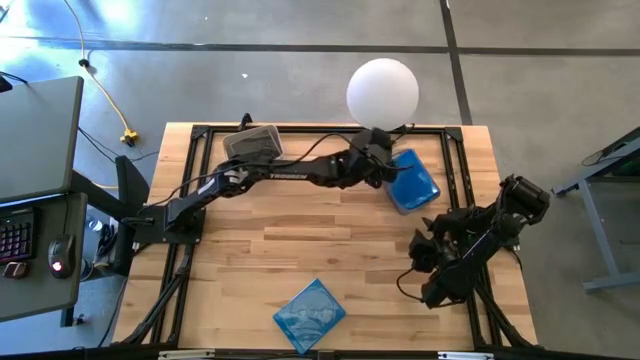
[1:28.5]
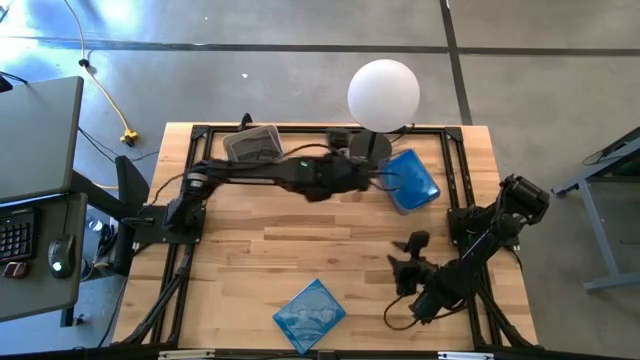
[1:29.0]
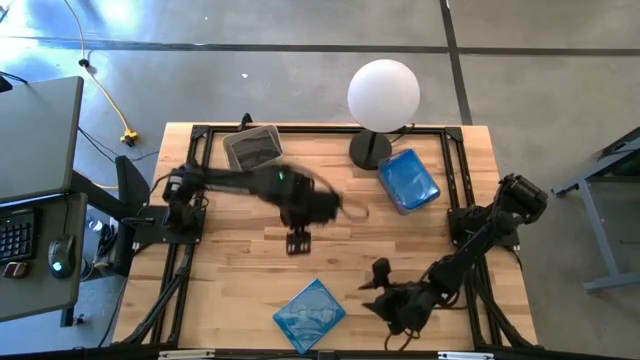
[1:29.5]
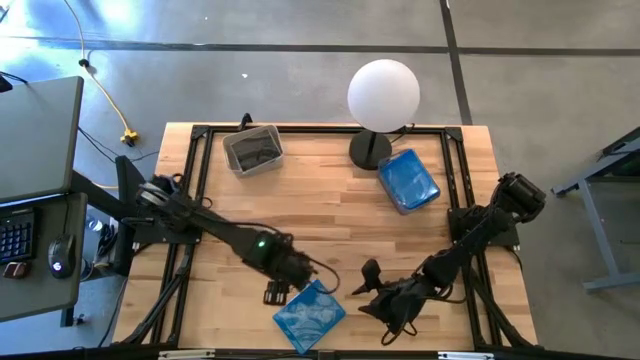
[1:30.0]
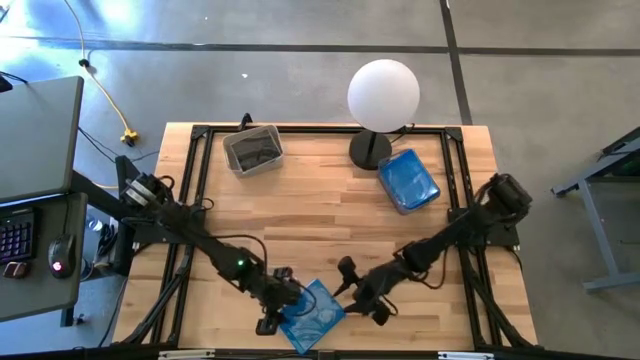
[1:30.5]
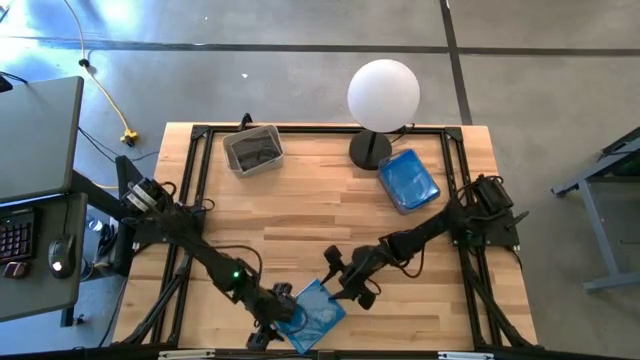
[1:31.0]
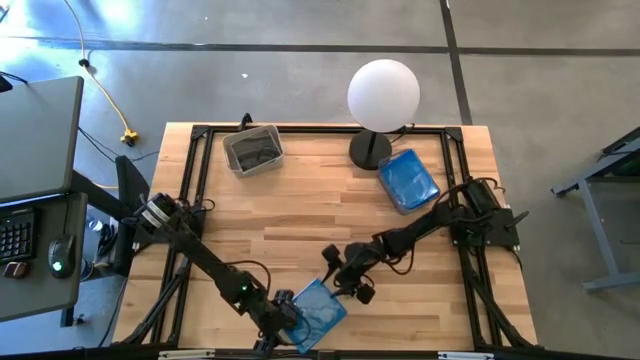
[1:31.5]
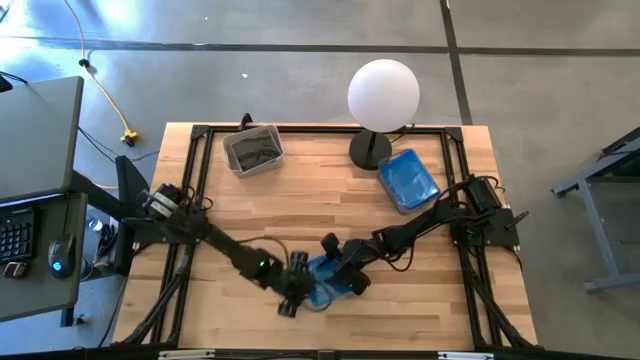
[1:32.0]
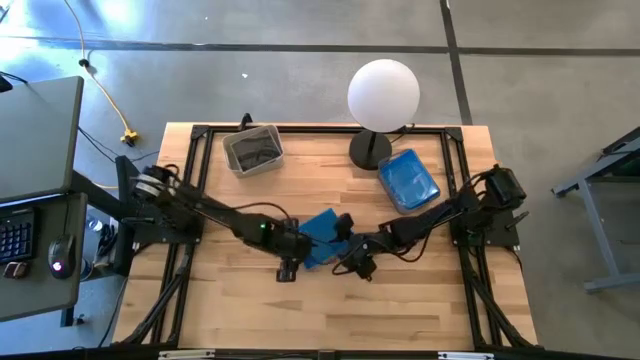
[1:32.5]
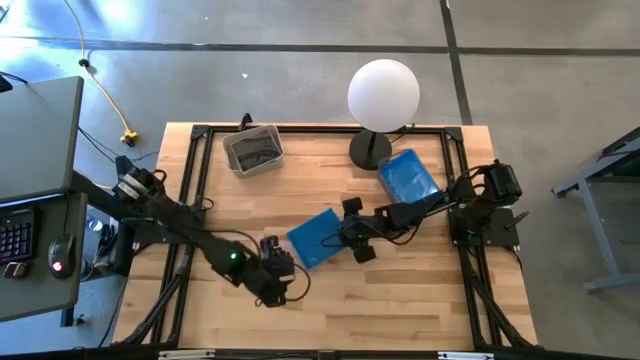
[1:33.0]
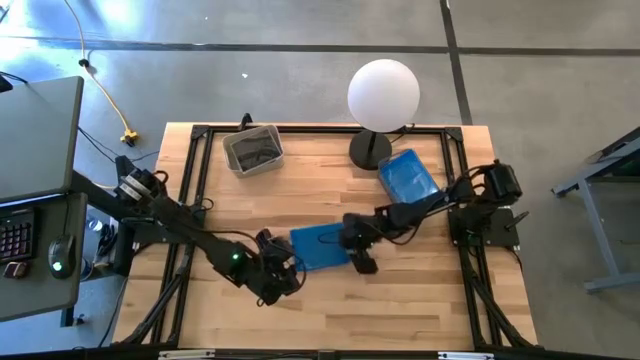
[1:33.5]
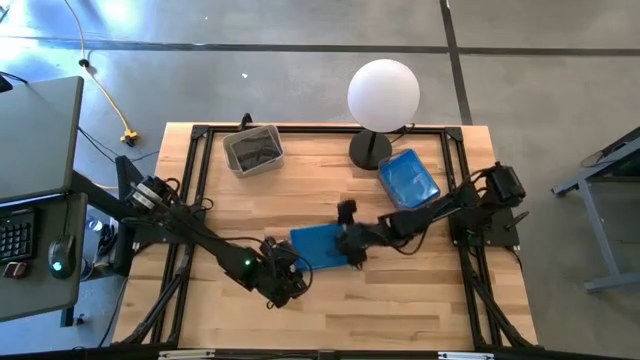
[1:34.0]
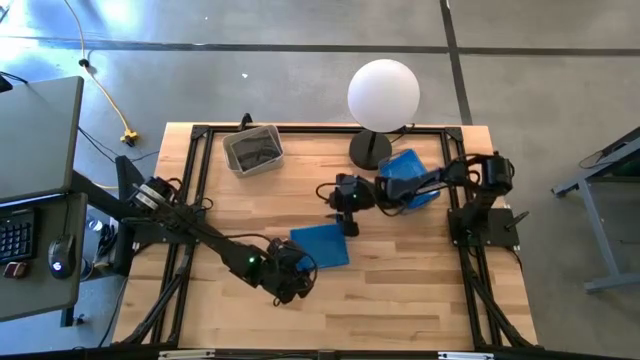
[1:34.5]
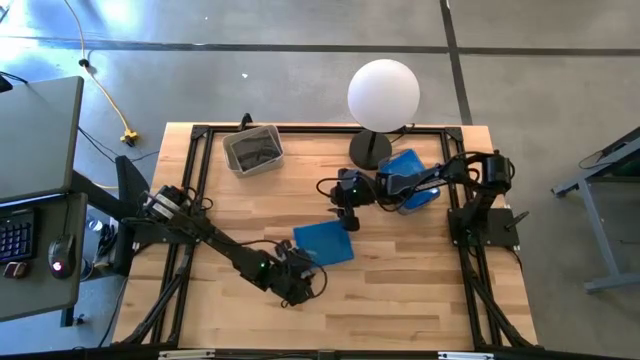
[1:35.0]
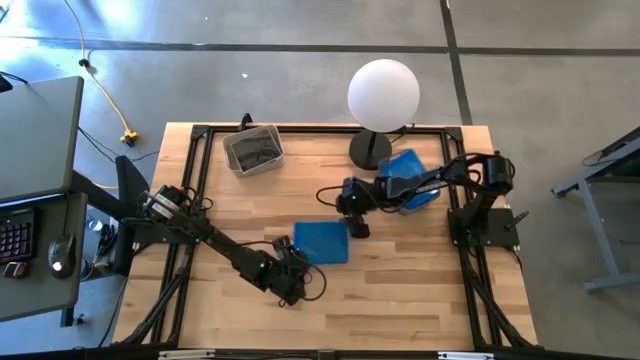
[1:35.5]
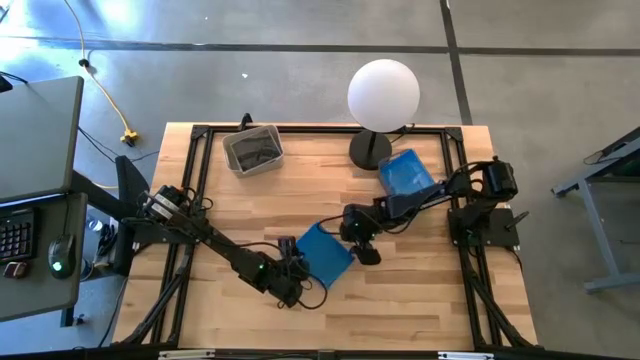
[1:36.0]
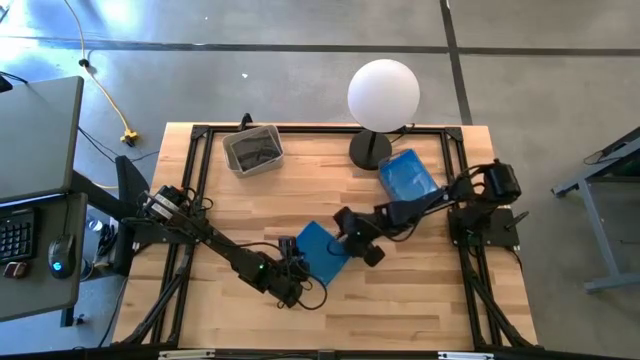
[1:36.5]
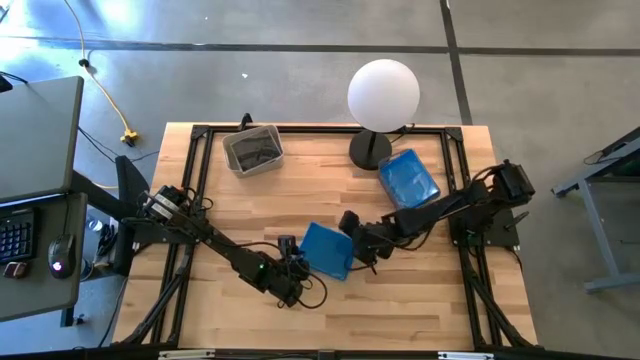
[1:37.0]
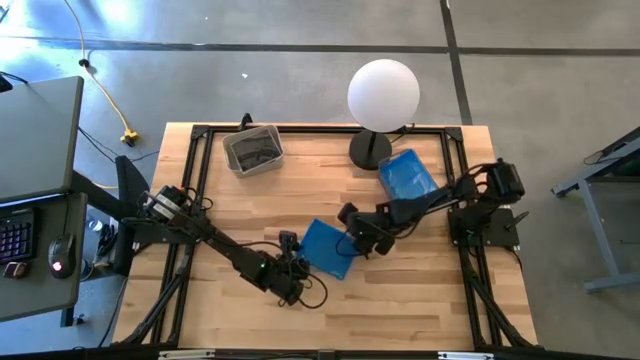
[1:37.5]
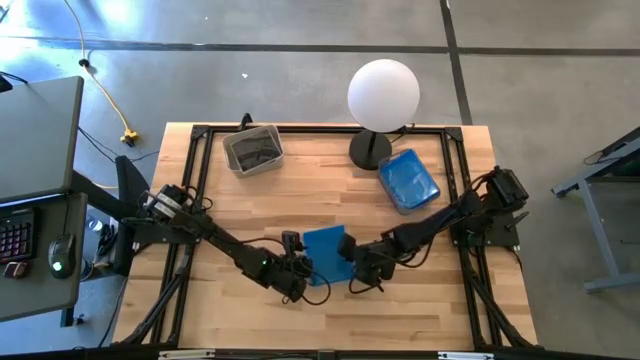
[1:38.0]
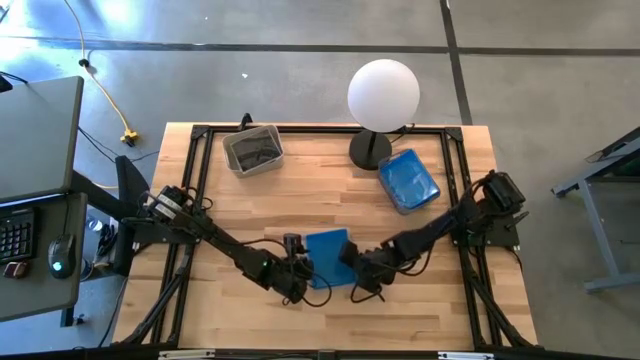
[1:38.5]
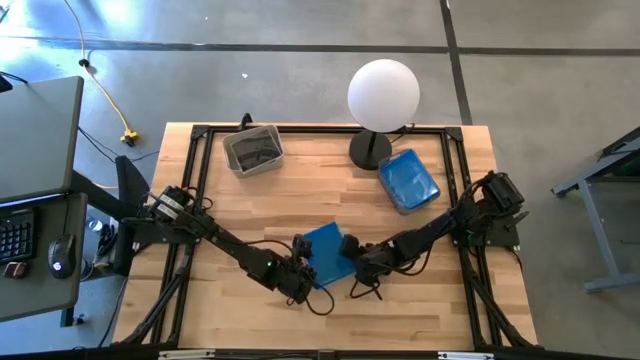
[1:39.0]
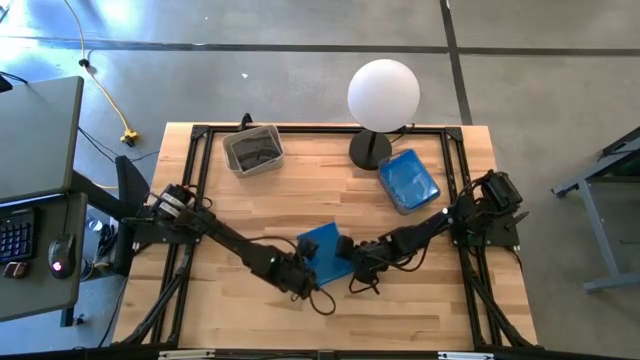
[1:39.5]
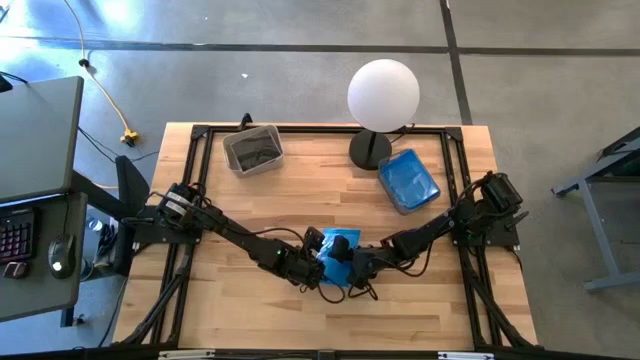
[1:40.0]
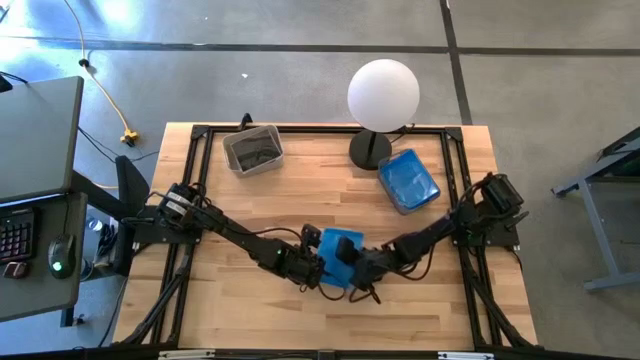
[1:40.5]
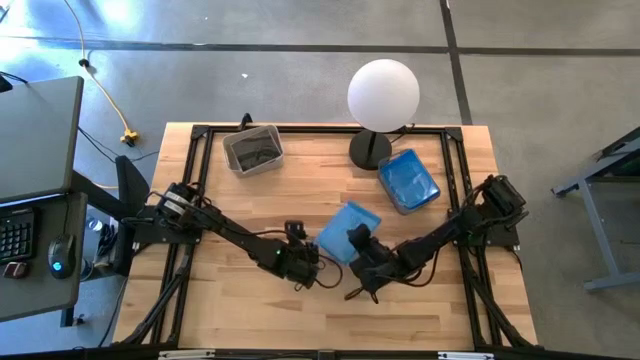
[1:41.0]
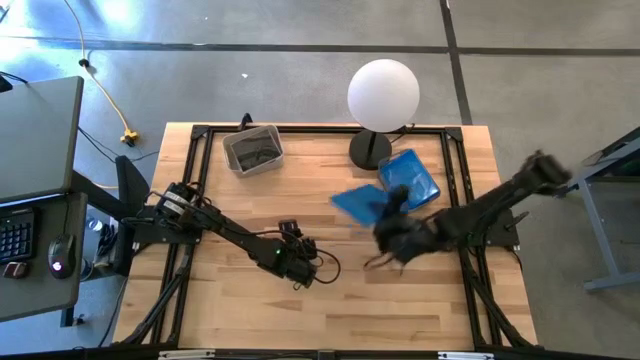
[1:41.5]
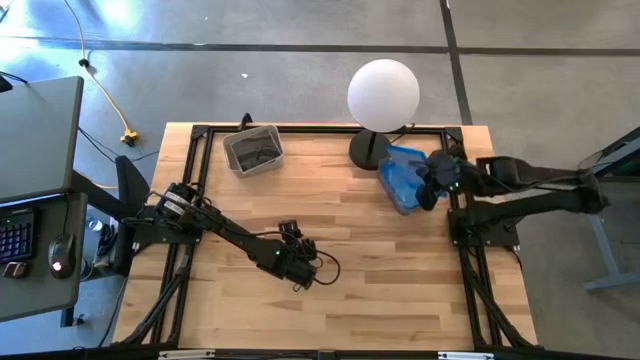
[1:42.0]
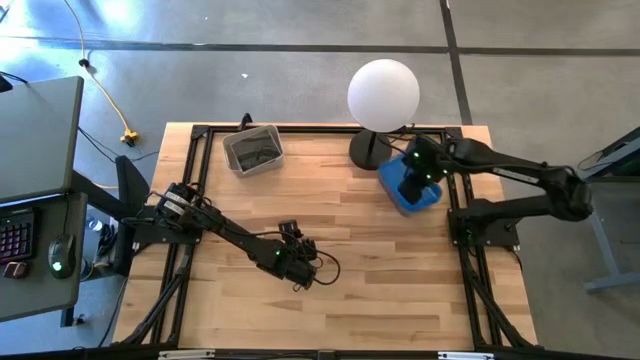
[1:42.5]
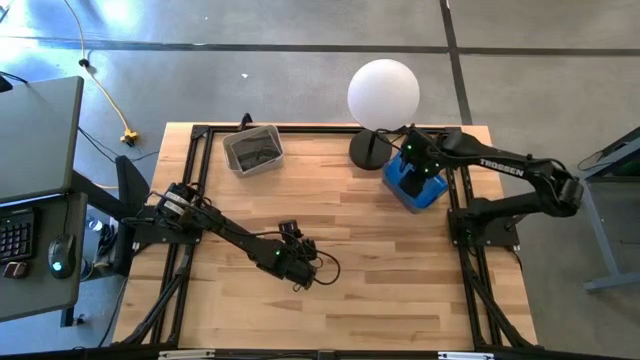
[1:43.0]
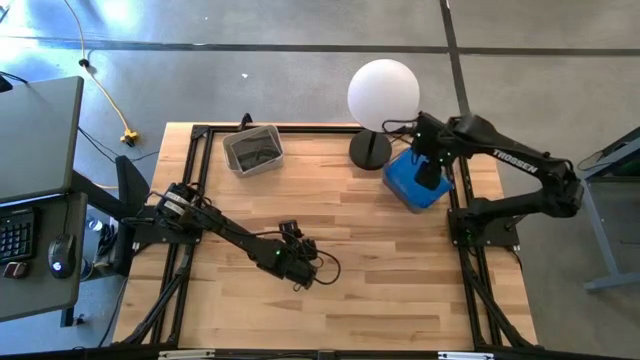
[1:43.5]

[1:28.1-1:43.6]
Task: Pick & place jewel cases by type
Put the blue CD case into the gray bin

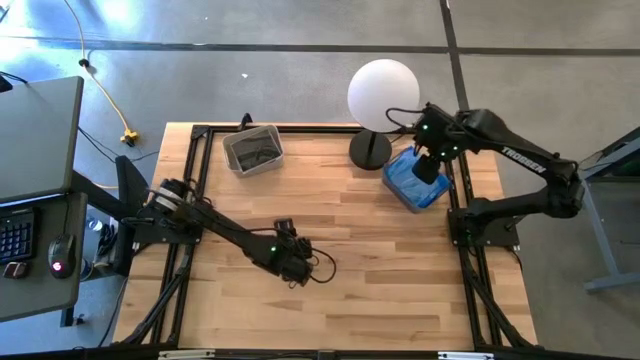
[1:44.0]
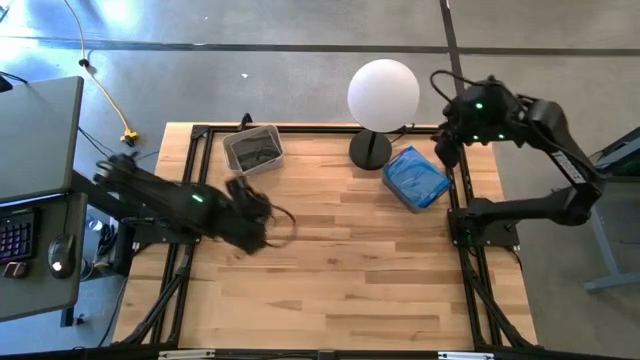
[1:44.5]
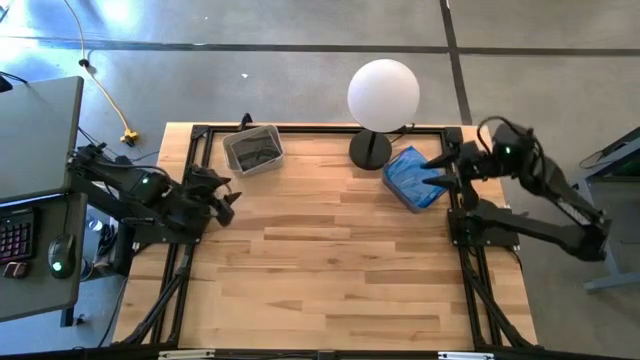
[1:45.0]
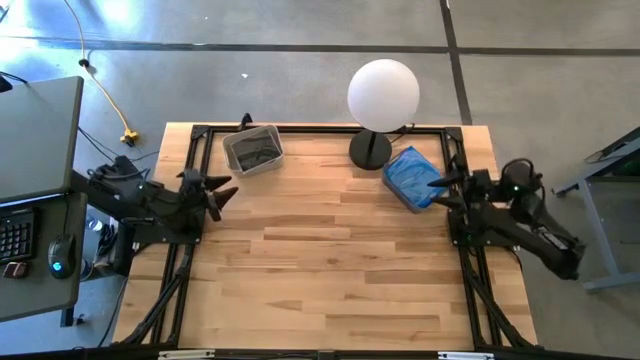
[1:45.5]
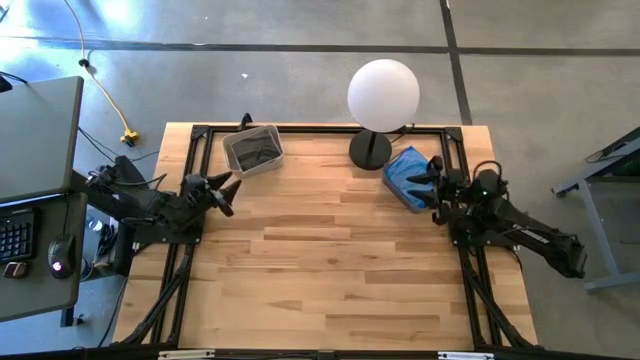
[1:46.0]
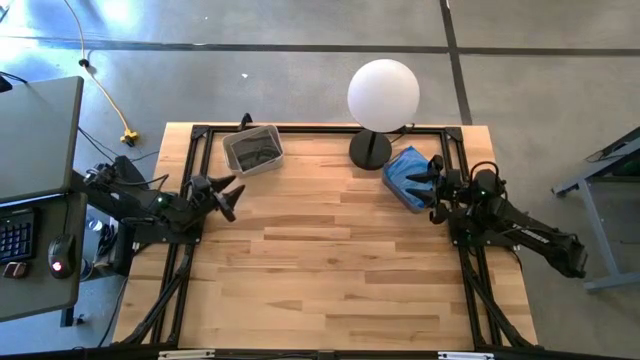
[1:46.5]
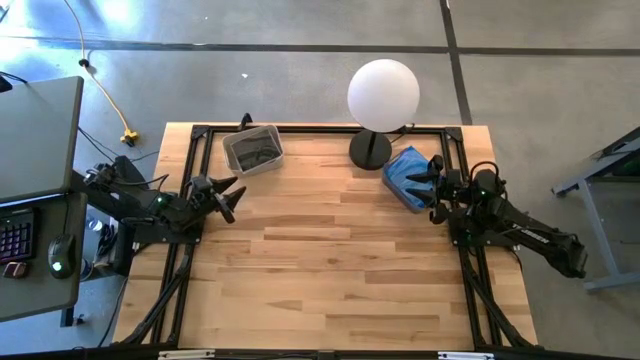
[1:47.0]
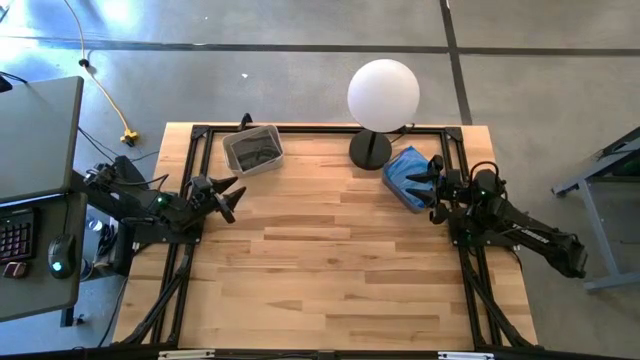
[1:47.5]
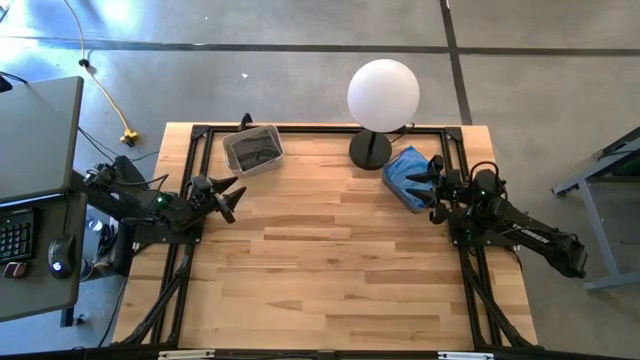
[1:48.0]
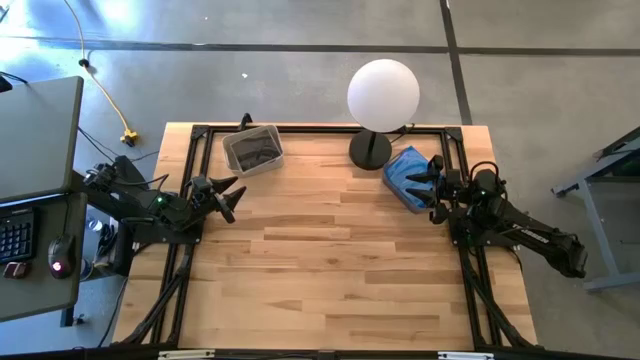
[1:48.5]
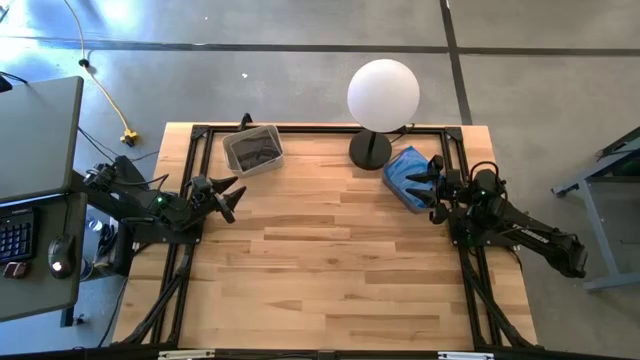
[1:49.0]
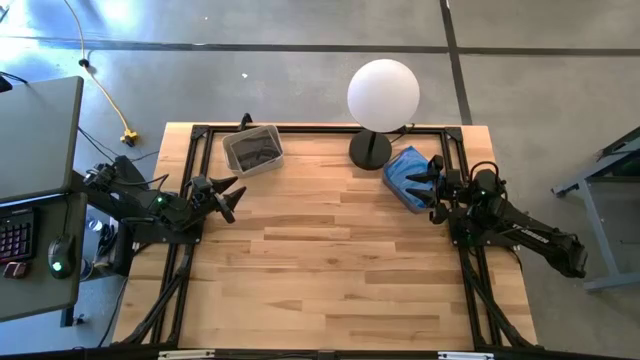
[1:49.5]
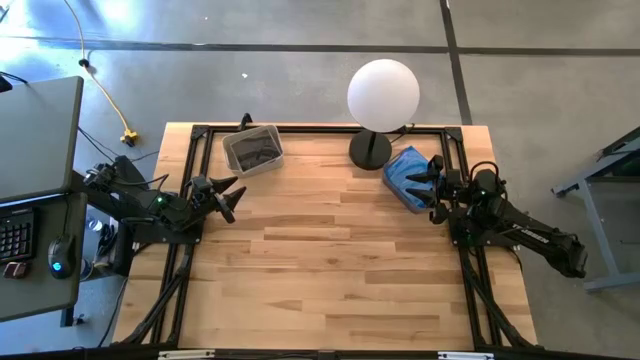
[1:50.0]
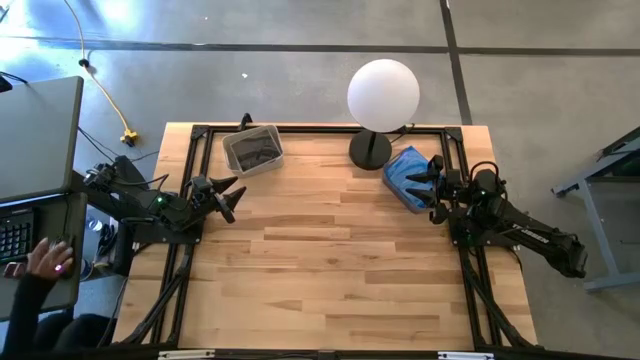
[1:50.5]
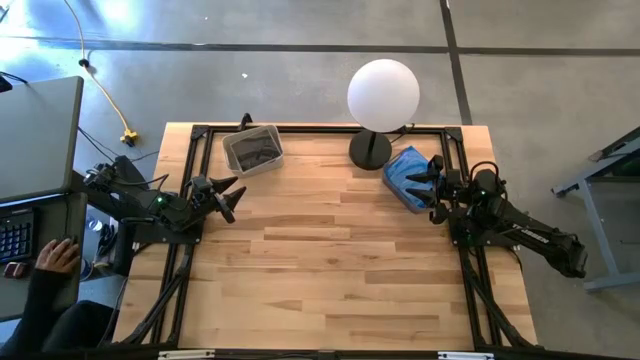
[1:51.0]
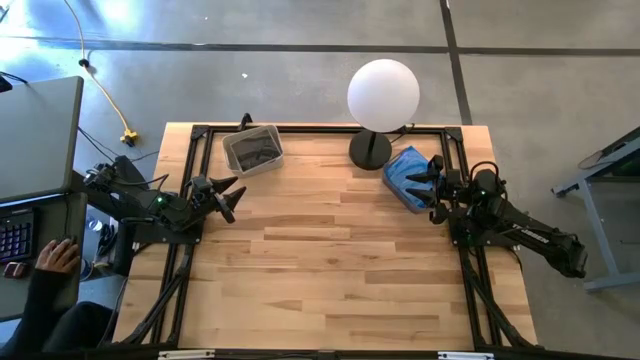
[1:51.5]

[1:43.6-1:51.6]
Return to Home Position
